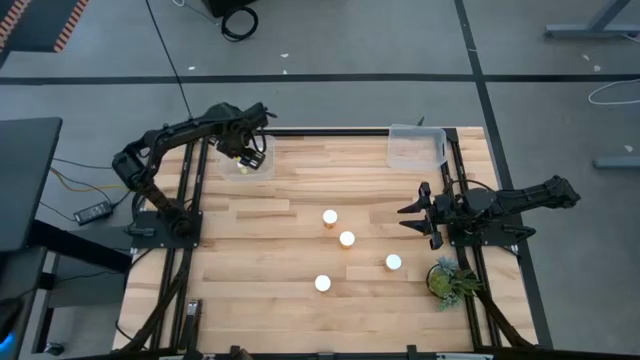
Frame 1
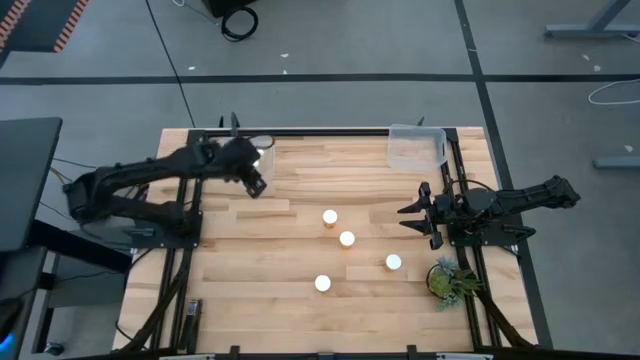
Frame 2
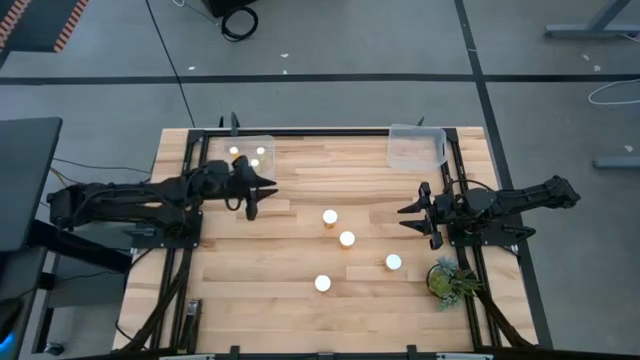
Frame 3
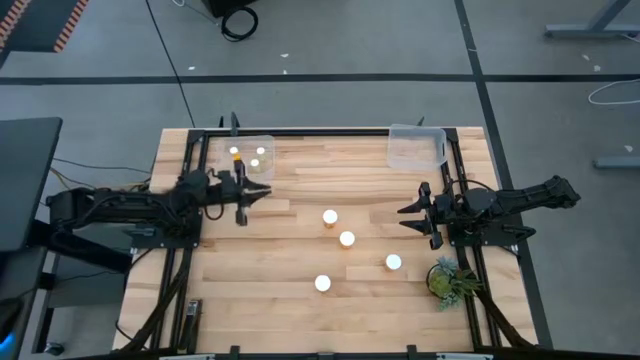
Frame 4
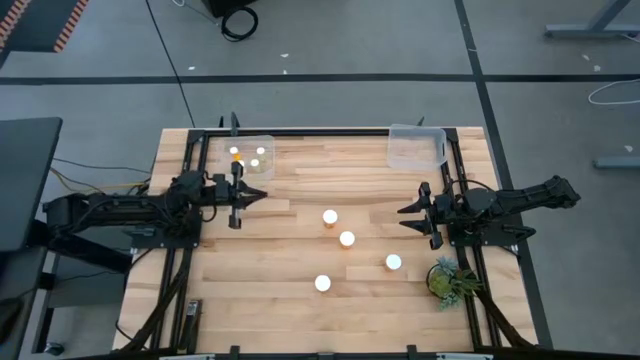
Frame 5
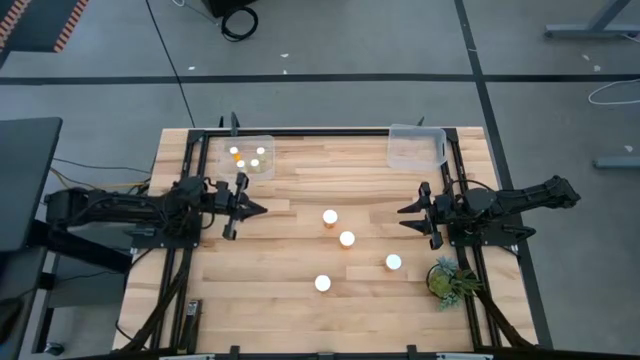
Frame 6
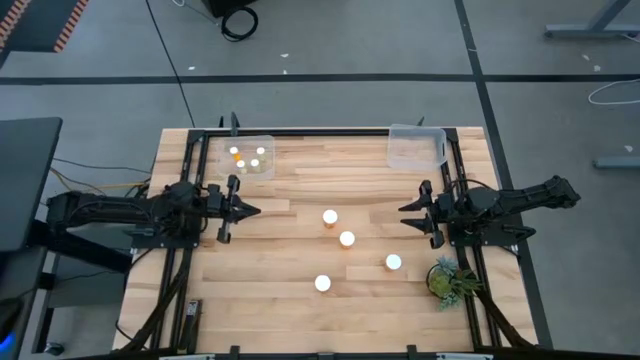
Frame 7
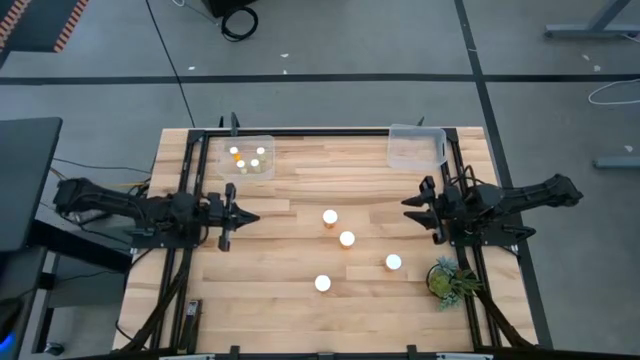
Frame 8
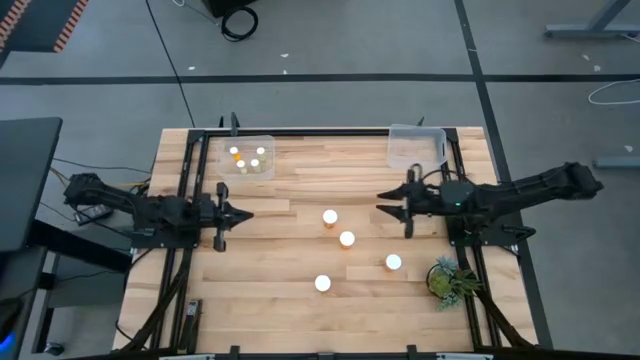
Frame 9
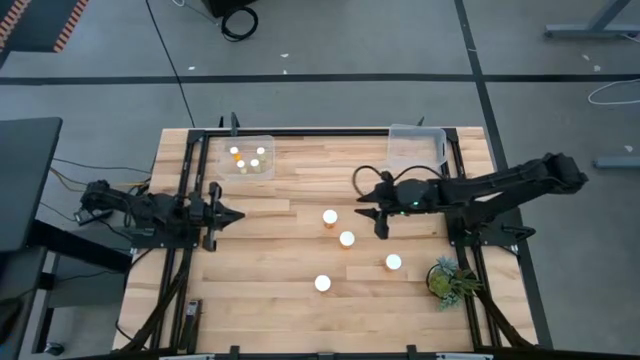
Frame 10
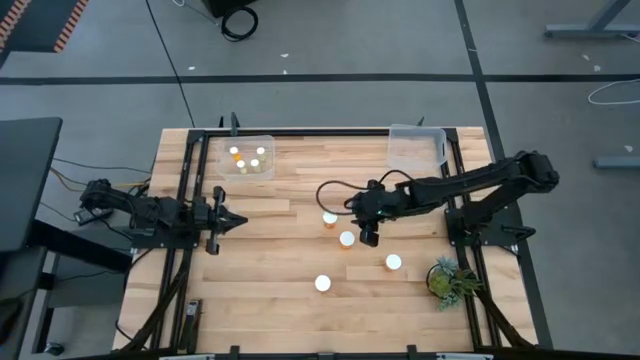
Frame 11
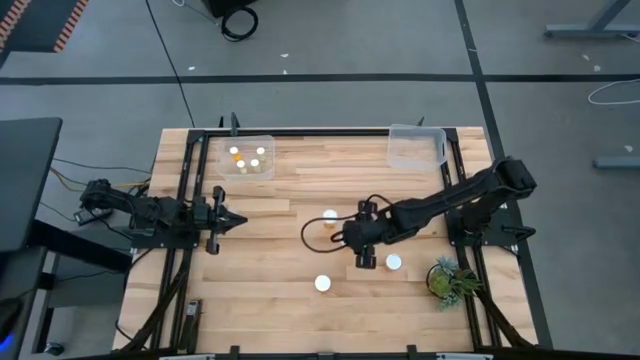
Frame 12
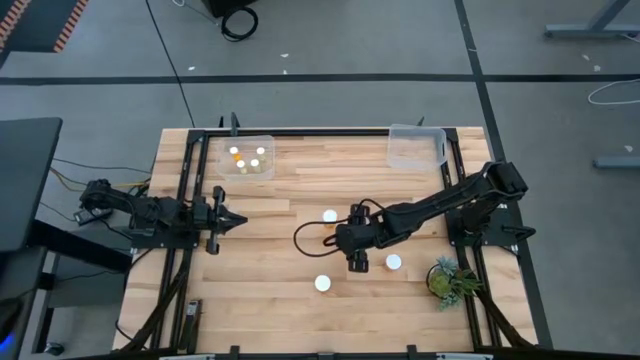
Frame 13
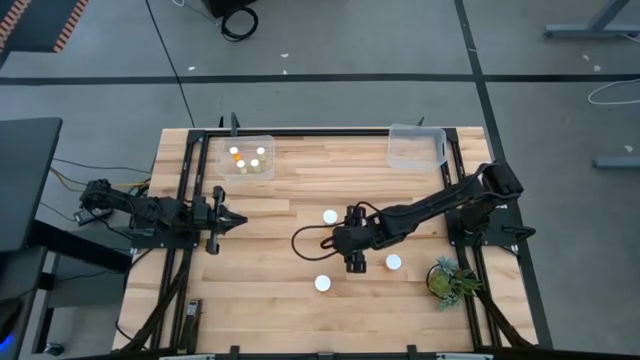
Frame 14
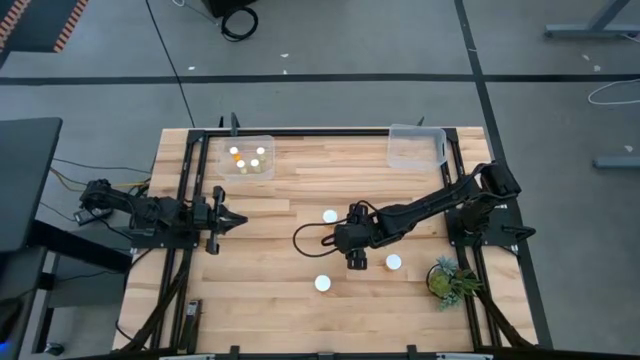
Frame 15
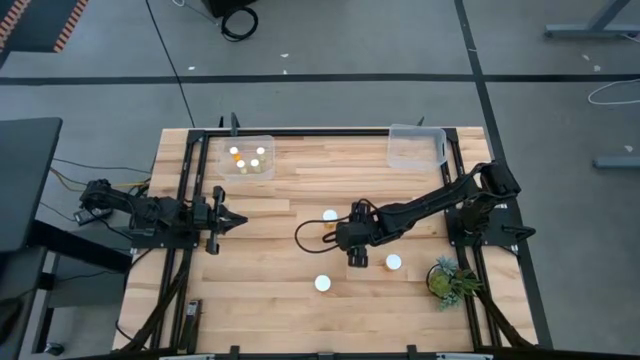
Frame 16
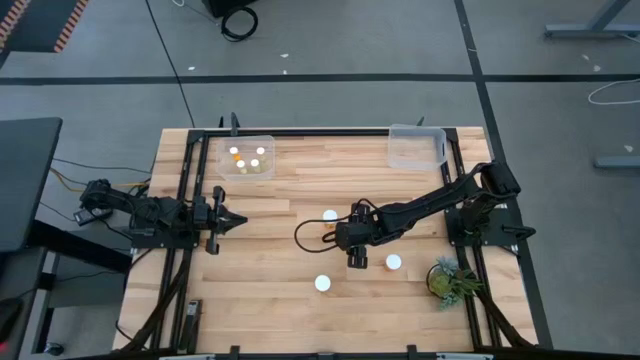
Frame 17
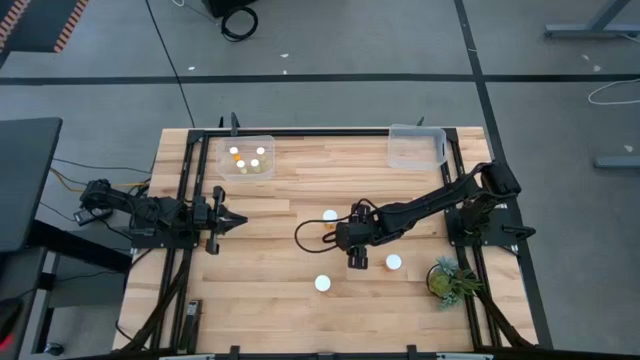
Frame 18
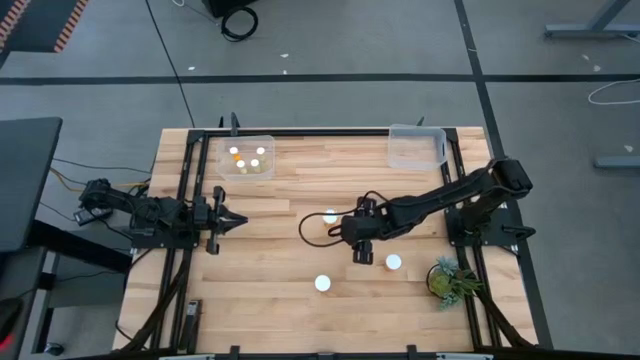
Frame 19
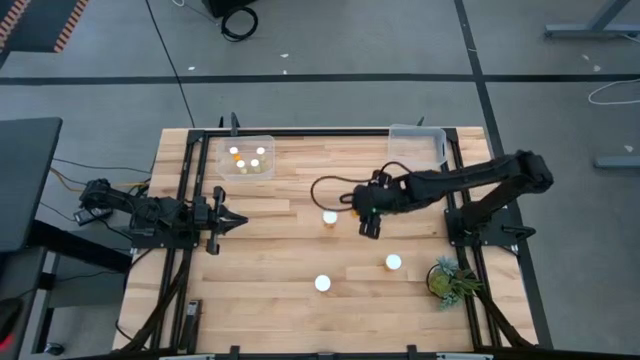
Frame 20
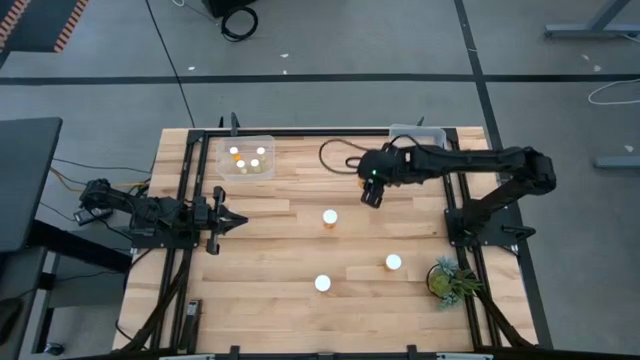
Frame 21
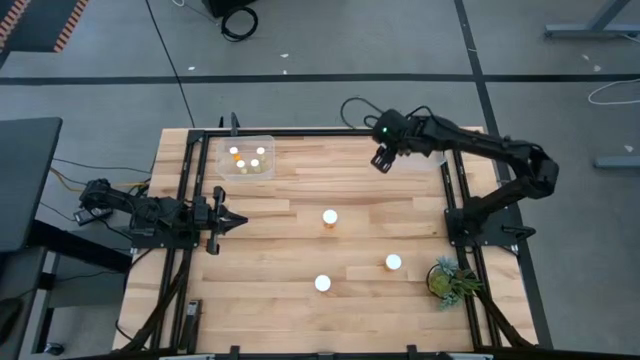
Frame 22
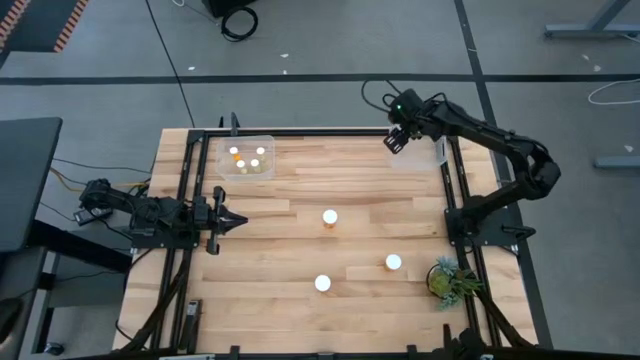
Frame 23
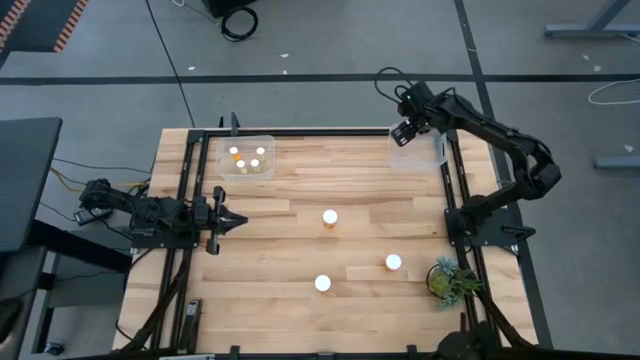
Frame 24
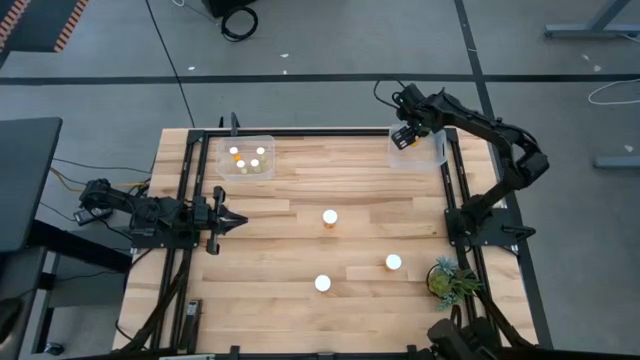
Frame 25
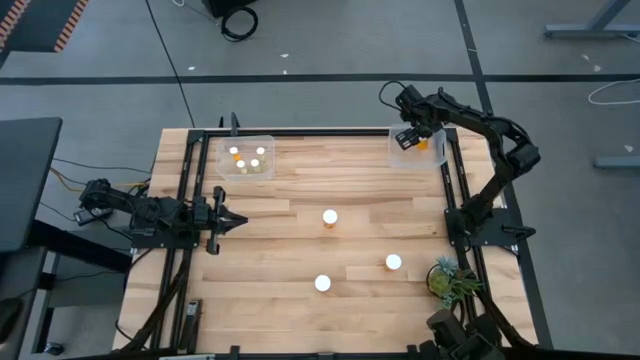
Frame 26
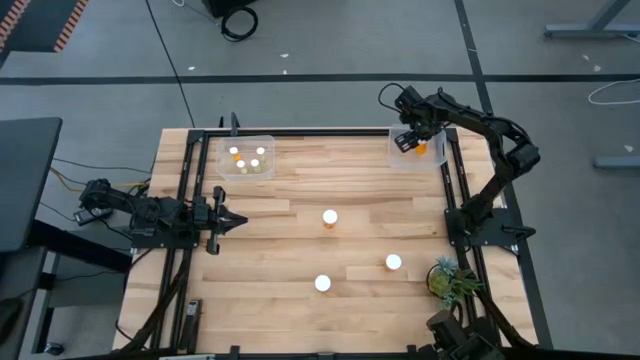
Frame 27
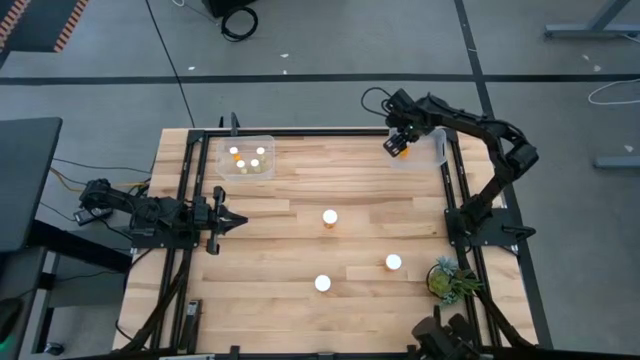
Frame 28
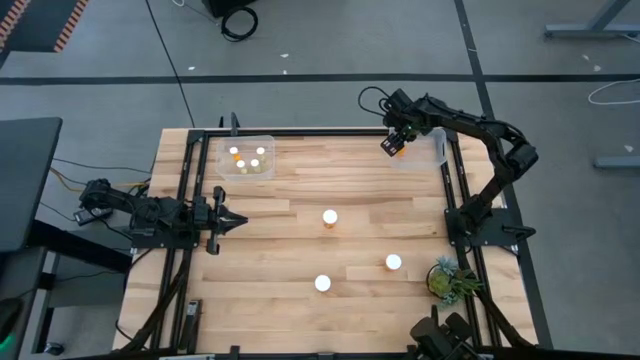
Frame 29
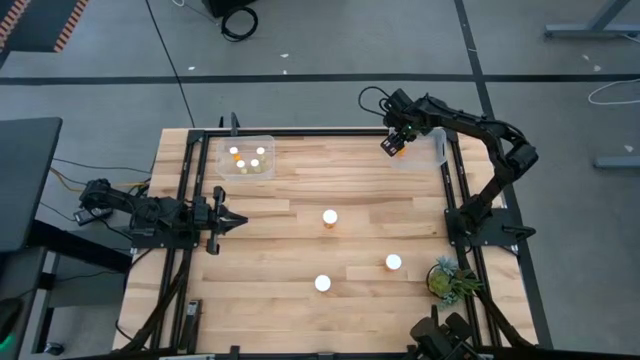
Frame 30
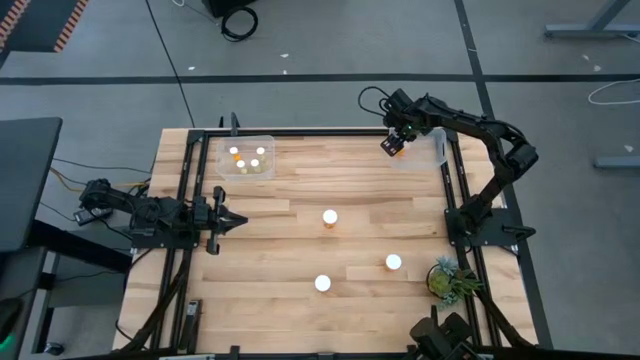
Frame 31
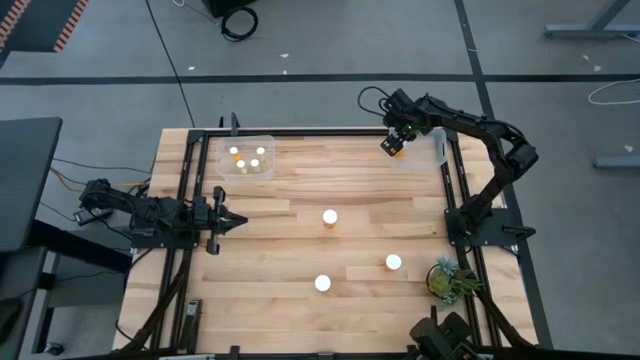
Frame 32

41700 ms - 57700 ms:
Task: Pick and place medicine bottles into bin by pill shape (circle, oval)
Put the orange capsule bottle into the right transparent bin

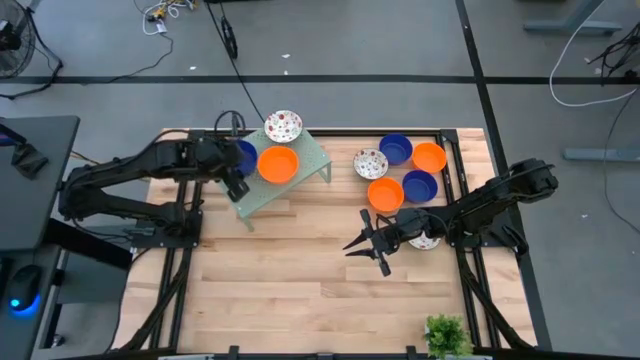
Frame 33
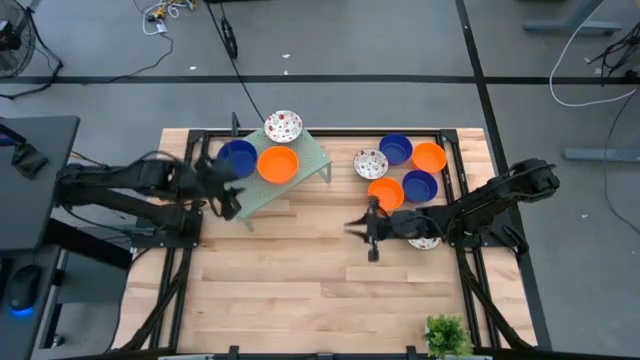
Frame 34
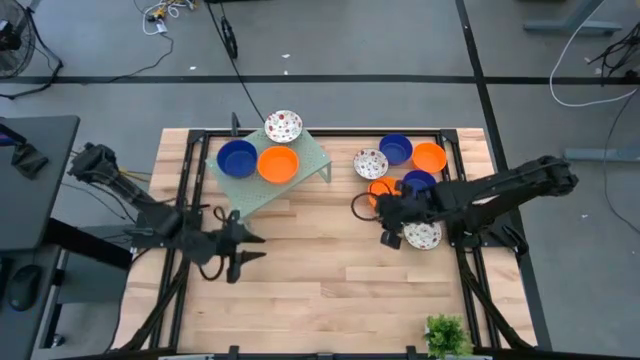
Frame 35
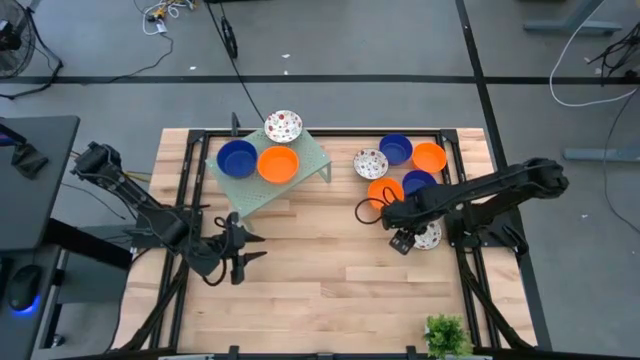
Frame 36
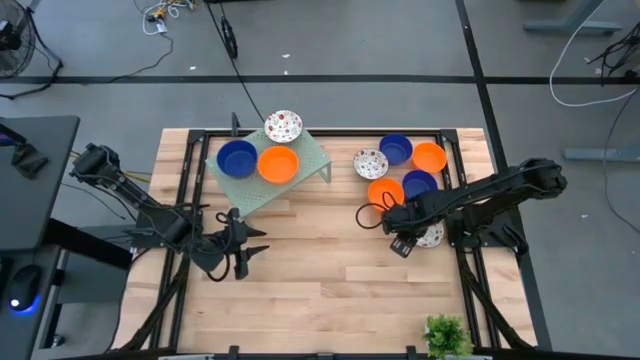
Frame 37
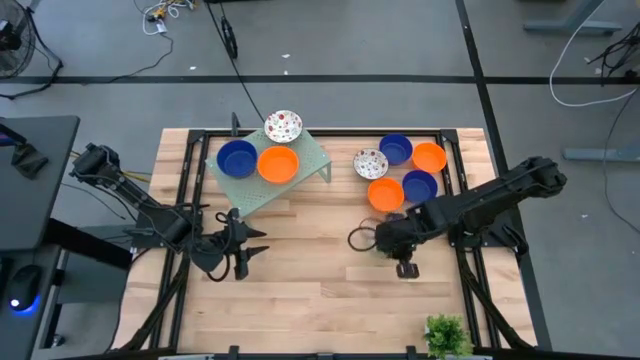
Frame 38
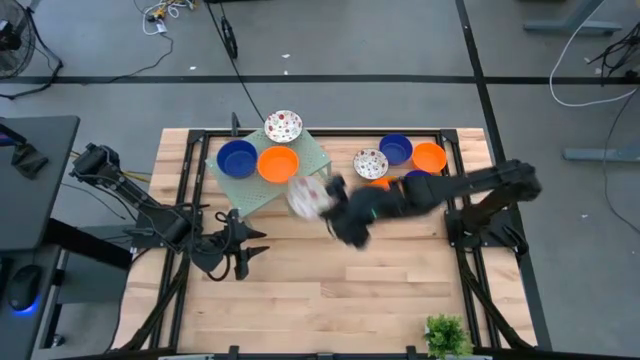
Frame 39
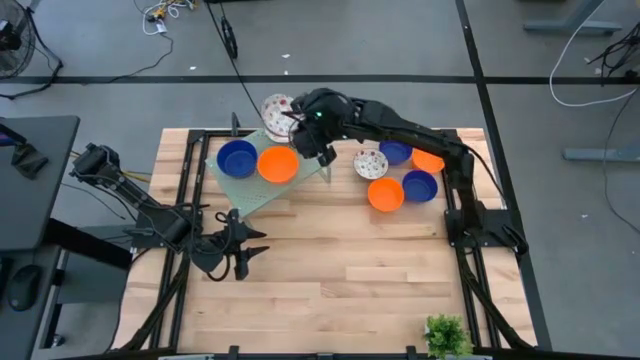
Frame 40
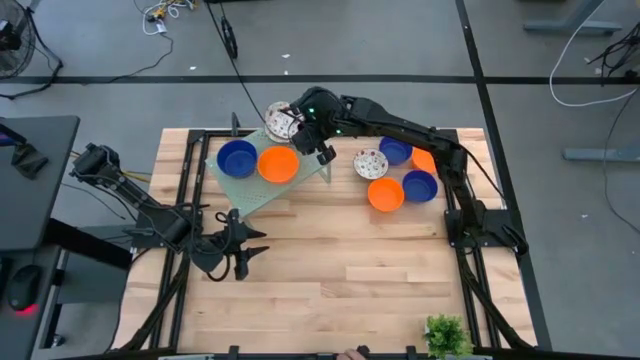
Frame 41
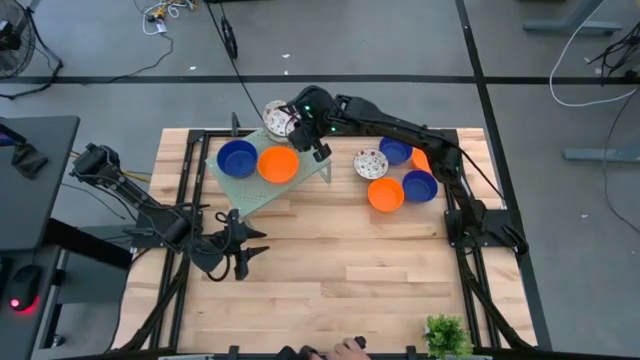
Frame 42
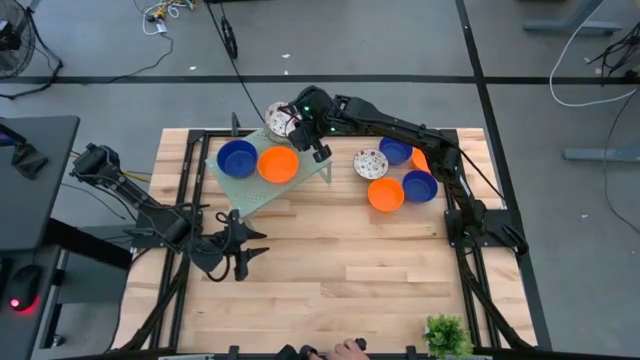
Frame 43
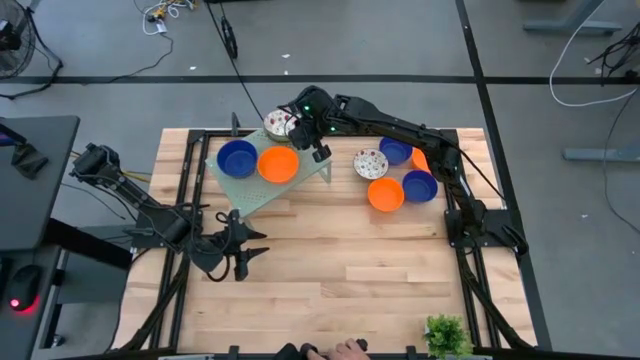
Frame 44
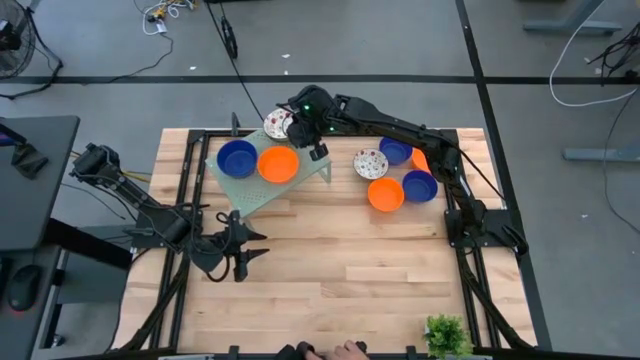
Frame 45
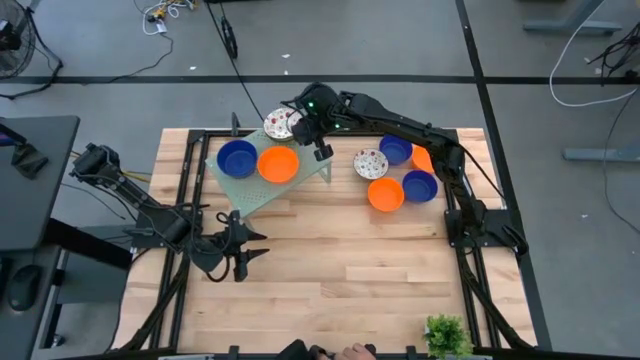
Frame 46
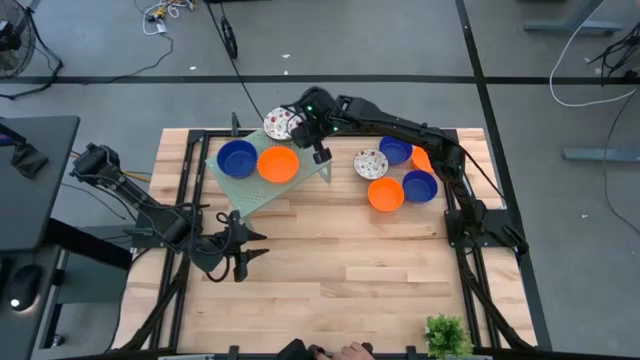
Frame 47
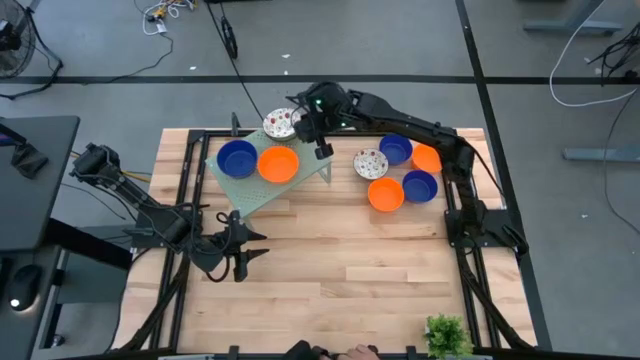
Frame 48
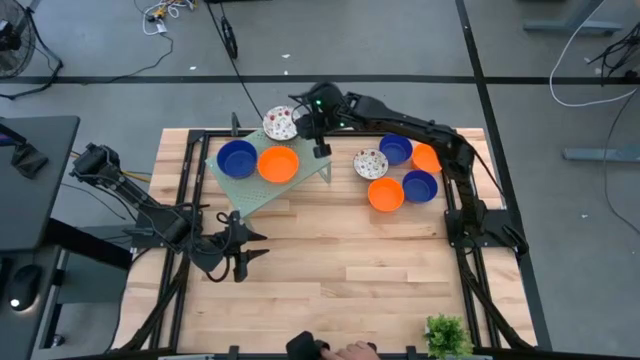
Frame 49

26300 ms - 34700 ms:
Task: Pick & Place Mini bowls
Stack the green bowl on the green bowl on the shelf
